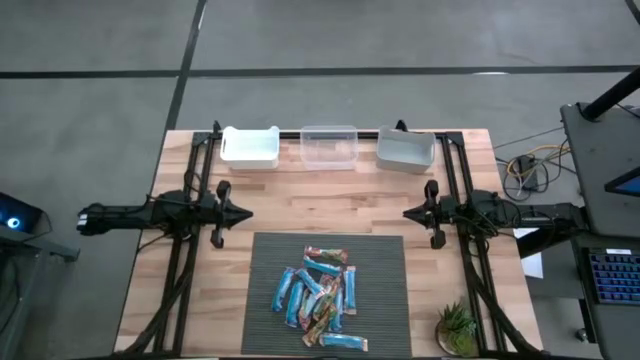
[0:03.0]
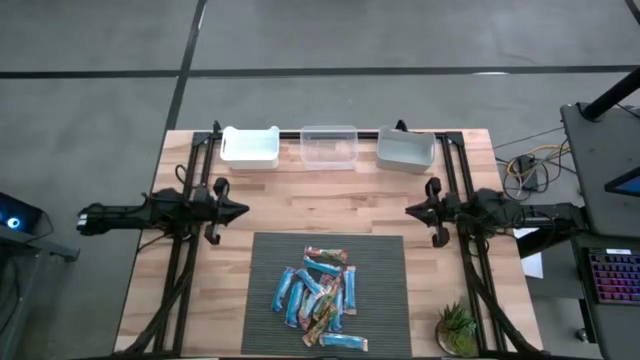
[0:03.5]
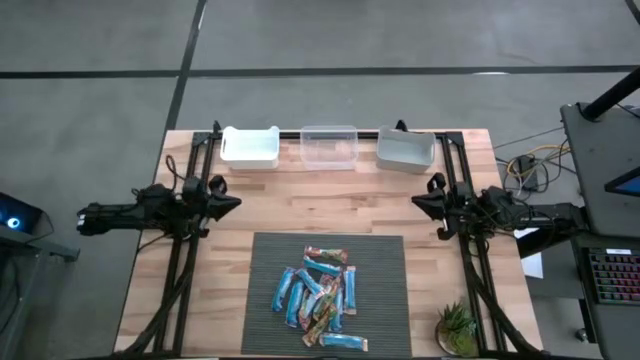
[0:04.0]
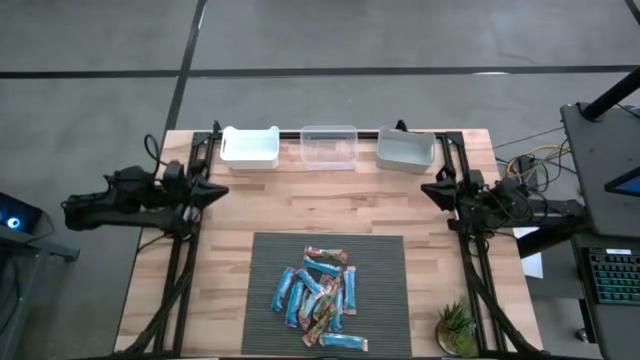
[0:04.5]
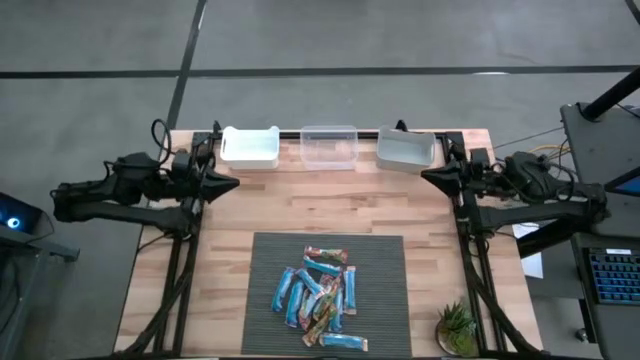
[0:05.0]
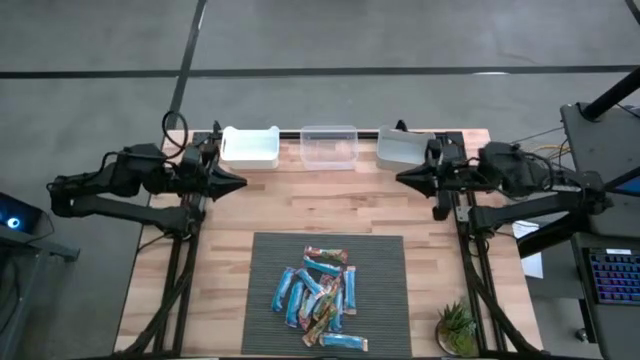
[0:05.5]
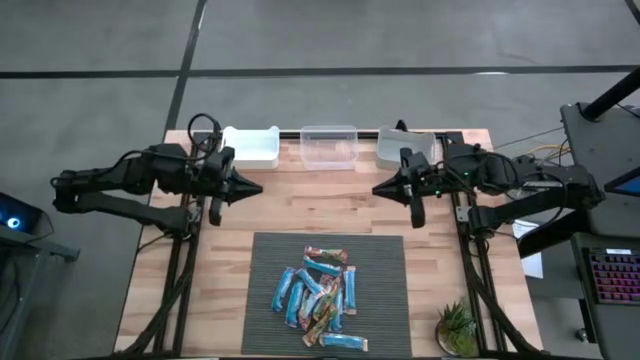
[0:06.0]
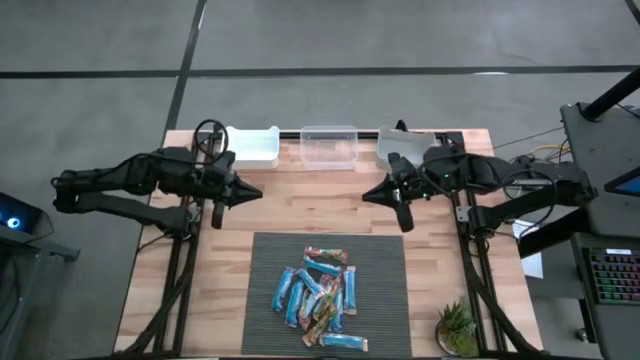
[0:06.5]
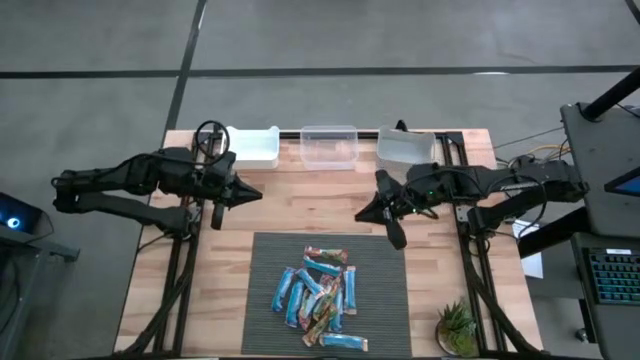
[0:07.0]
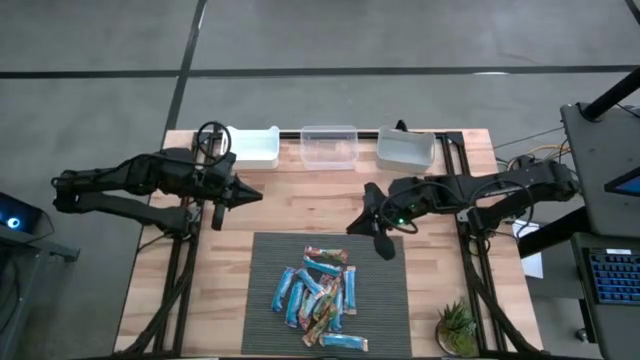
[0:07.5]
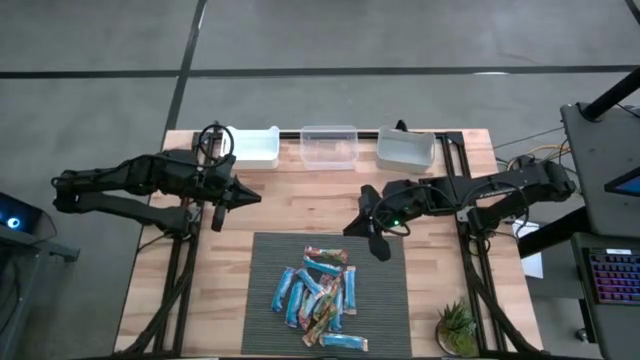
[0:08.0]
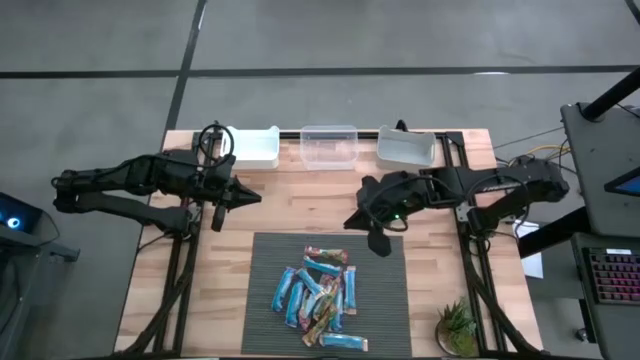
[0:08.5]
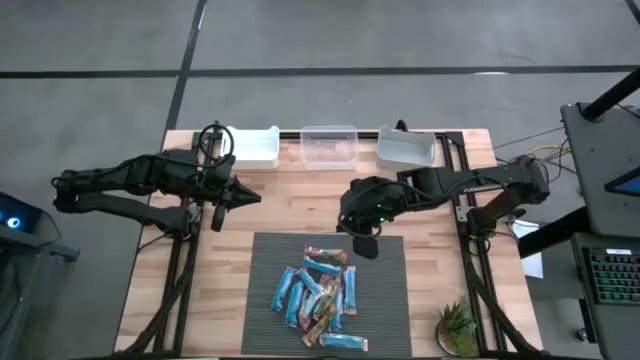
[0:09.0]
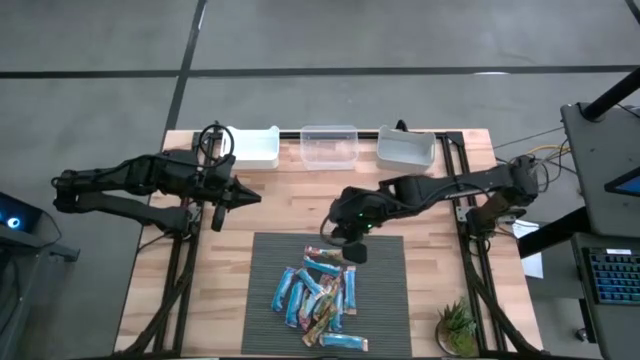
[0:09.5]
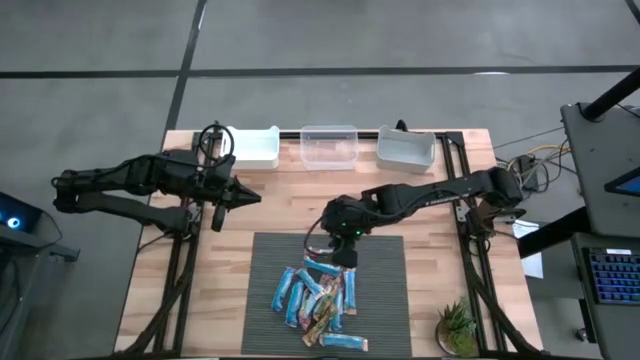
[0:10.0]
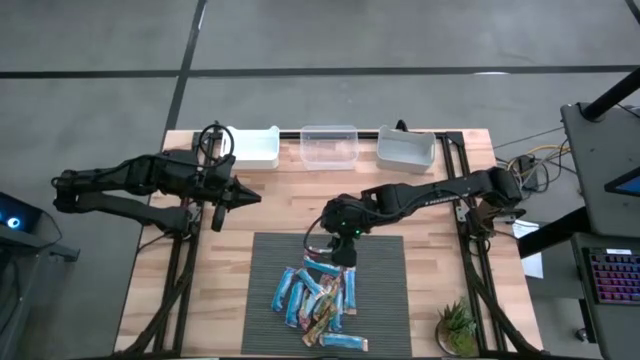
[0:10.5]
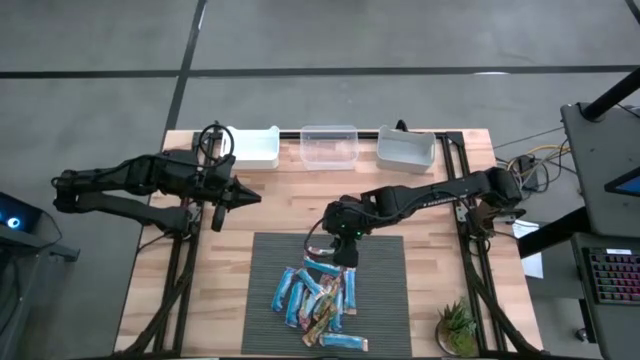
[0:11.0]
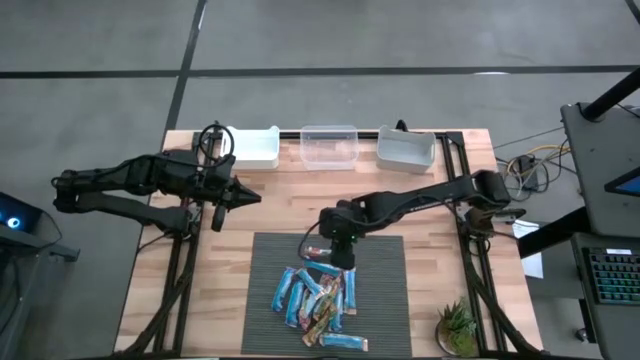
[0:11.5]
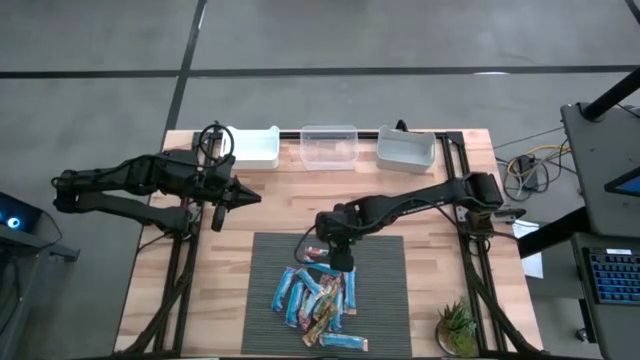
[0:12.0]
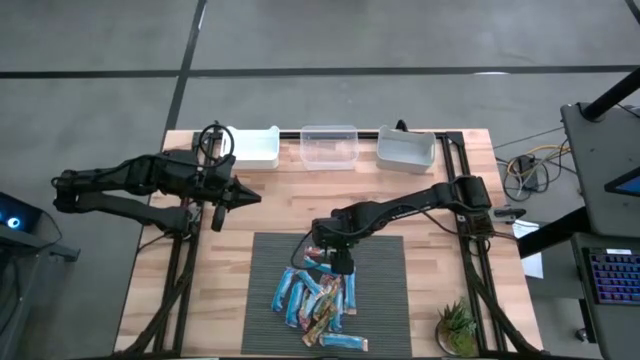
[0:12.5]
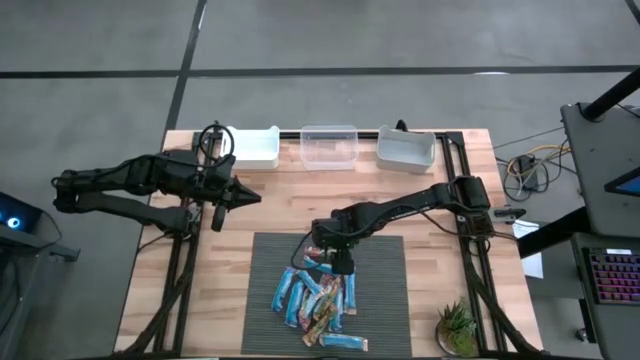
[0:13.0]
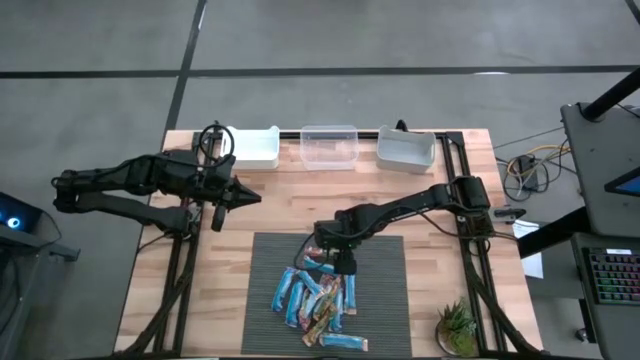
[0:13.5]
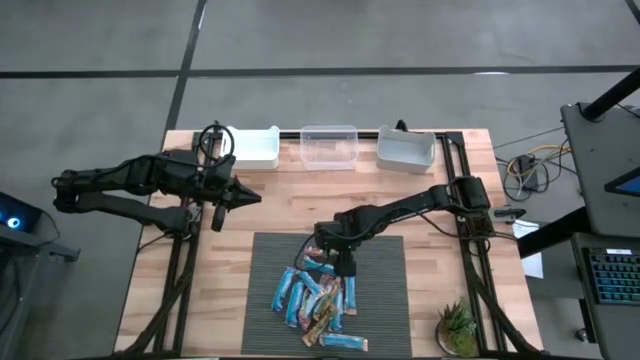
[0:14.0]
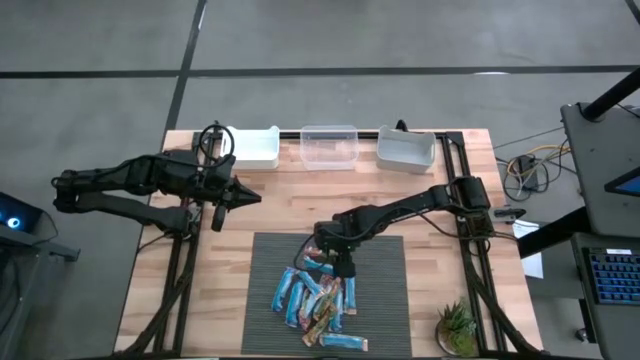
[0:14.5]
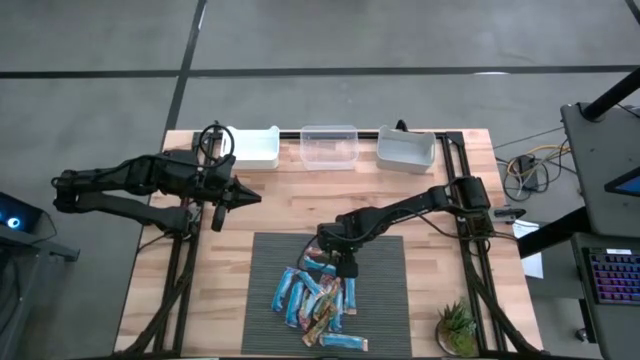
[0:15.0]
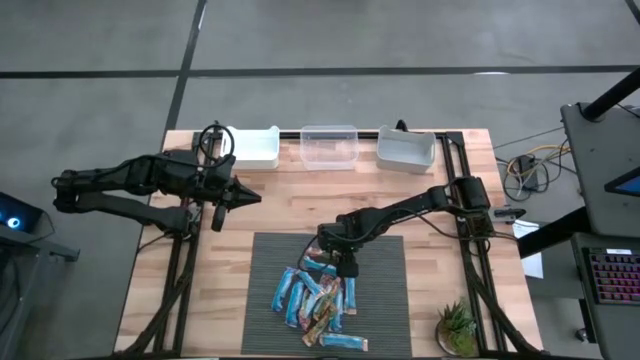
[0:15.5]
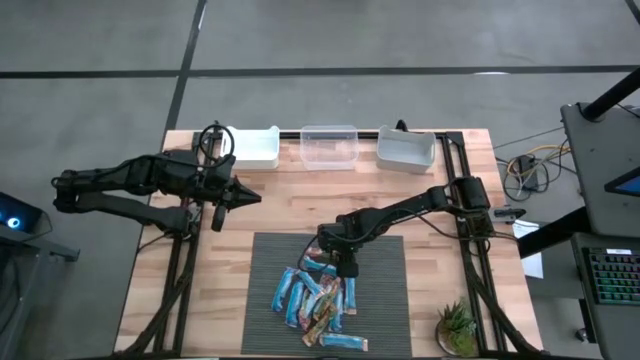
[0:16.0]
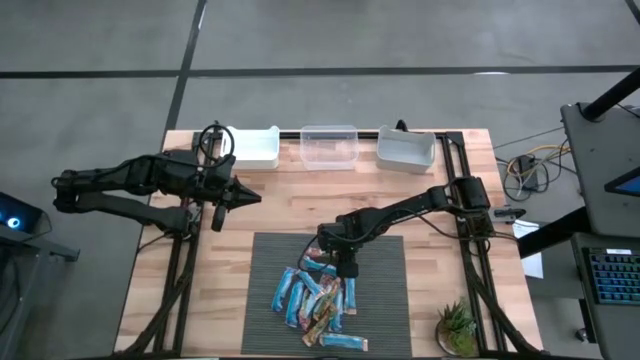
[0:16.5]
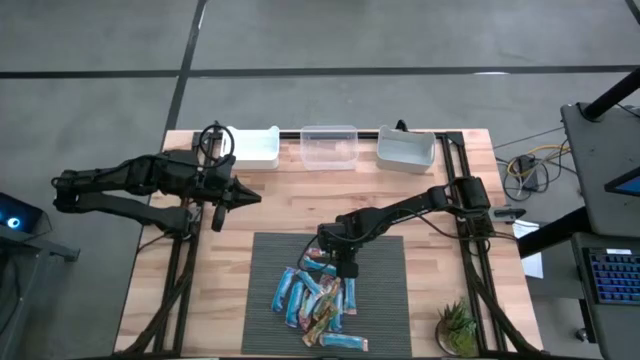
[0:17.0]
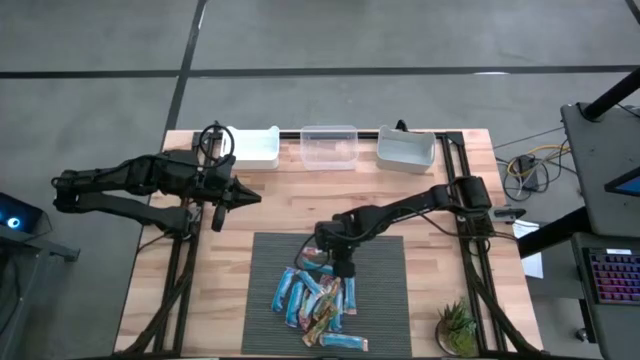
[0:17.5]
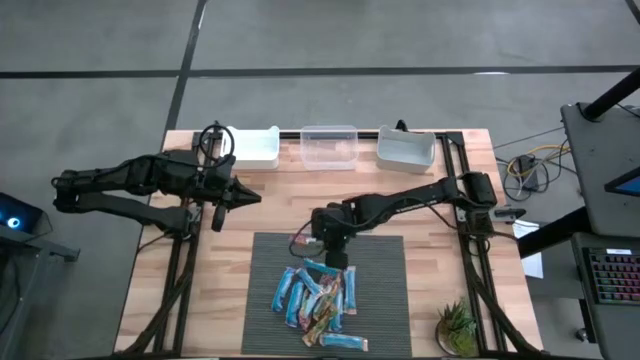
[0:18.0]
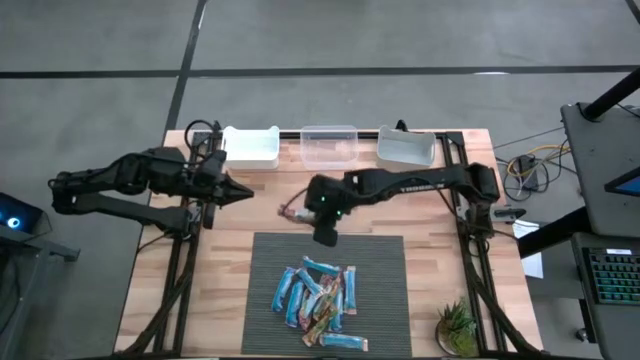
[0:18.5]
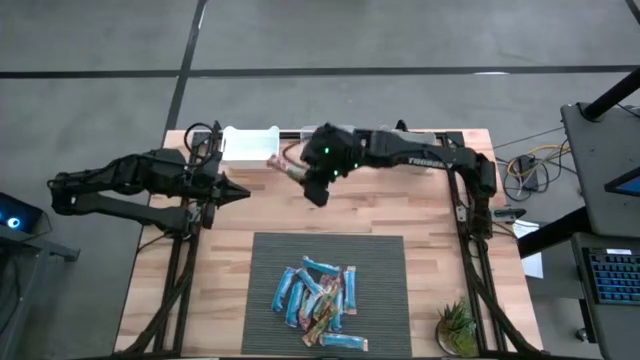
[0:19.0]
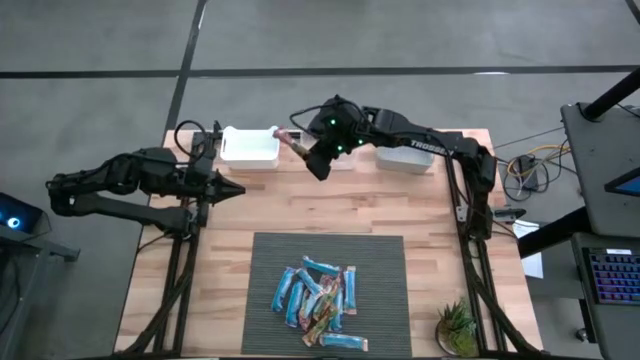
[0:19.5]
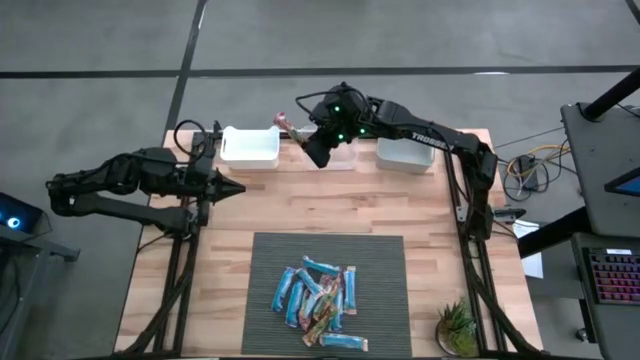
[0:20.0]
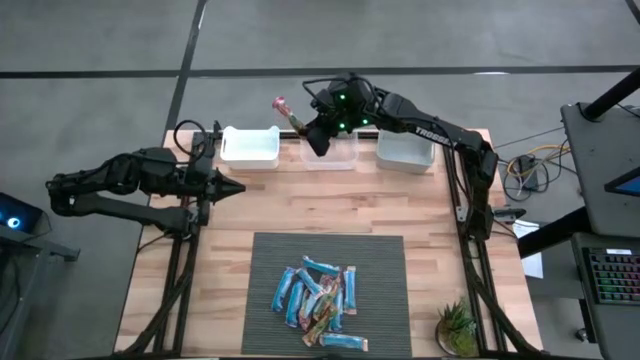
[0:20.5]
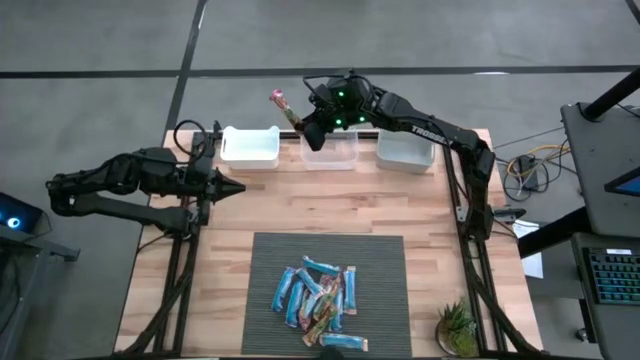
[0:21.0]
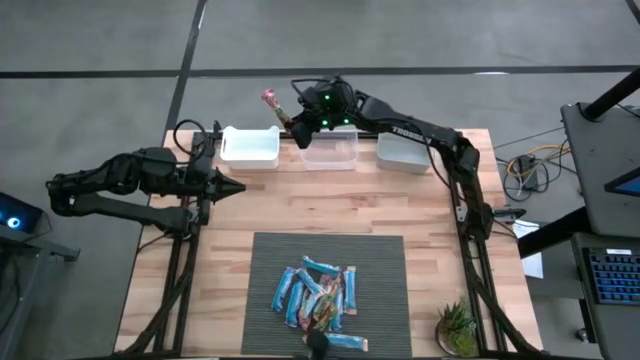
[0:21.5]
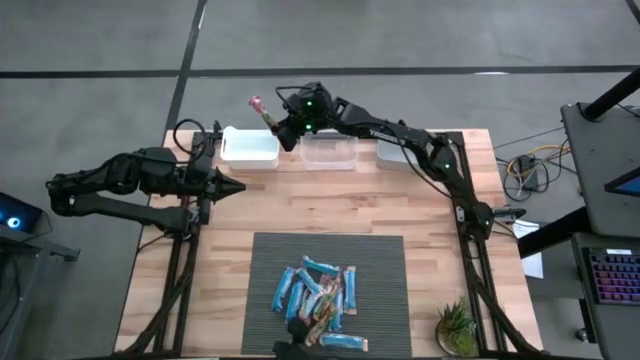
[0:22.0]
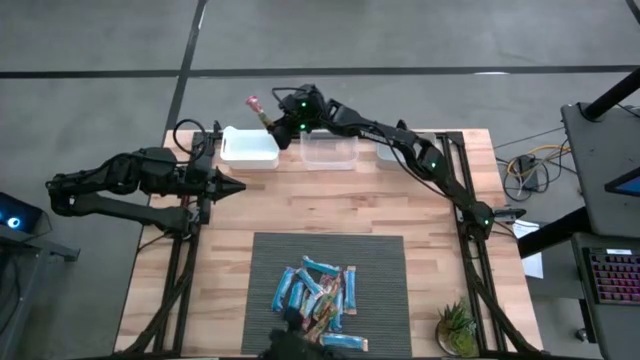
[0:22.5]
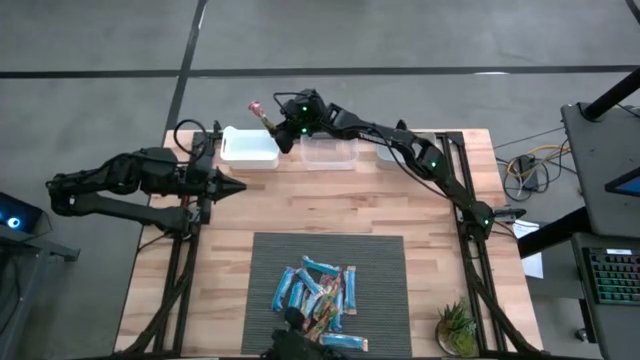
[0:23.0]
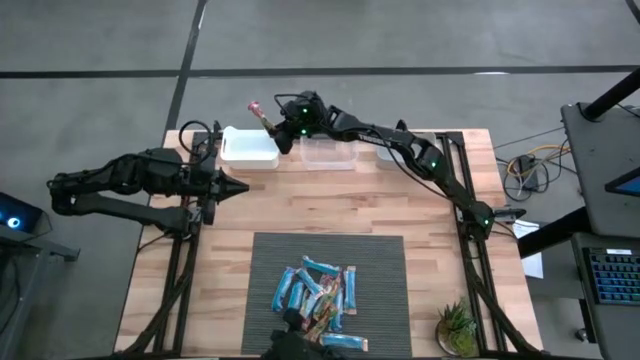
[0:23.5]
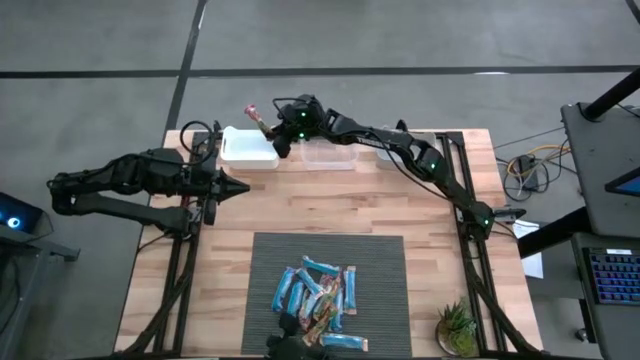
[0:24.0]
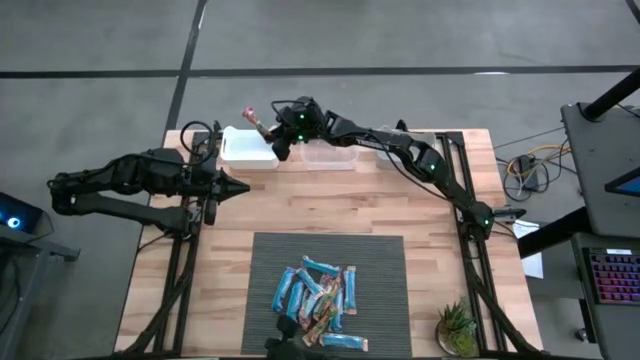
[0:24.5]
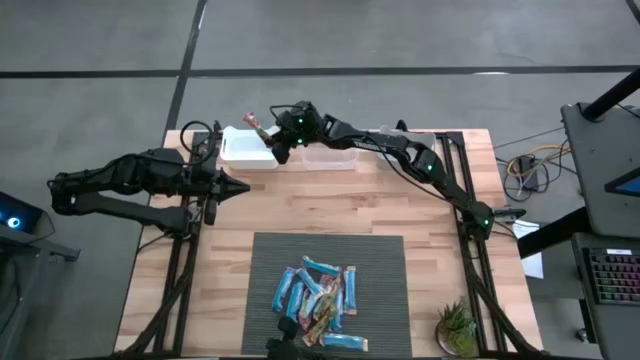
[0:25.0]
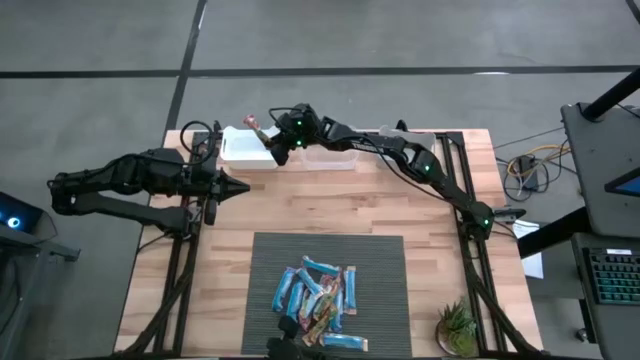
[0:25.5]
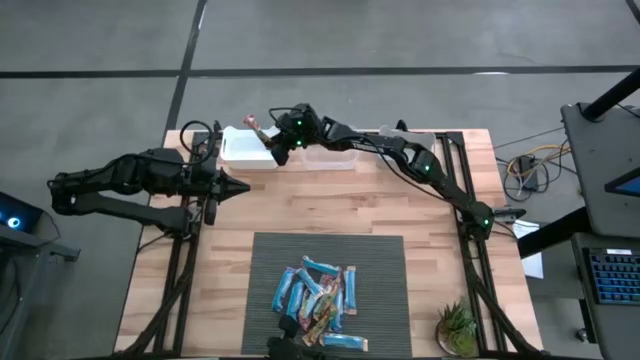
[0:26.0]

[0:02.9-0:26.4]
Task: Pick and place Granola Bars by type
Put the red granola bar into the white bin
